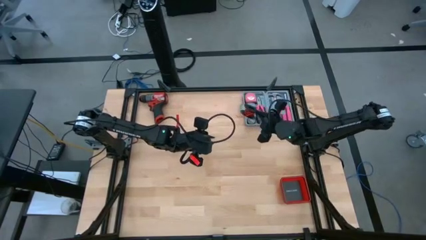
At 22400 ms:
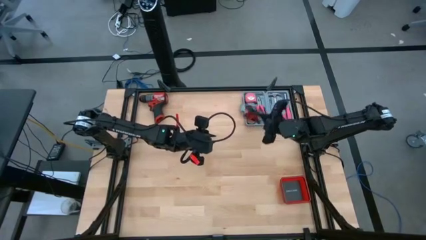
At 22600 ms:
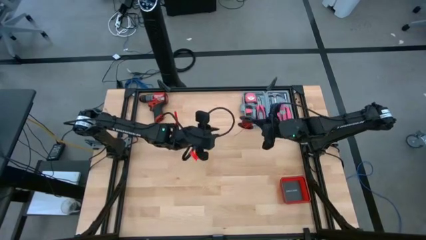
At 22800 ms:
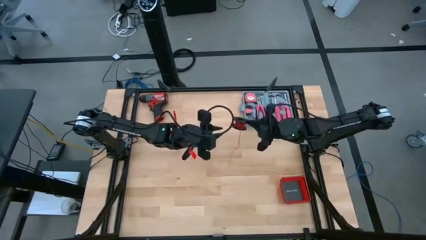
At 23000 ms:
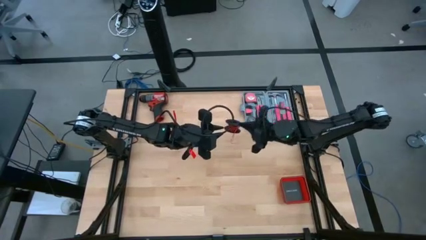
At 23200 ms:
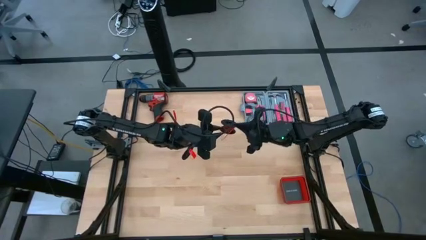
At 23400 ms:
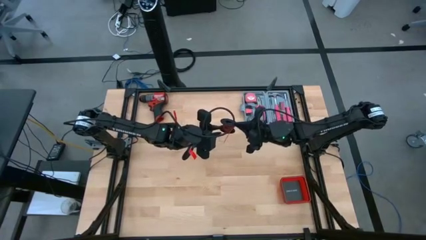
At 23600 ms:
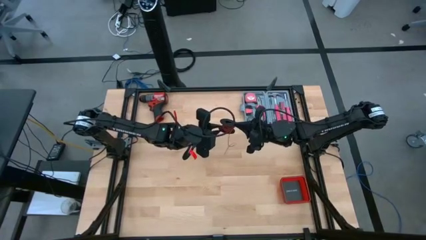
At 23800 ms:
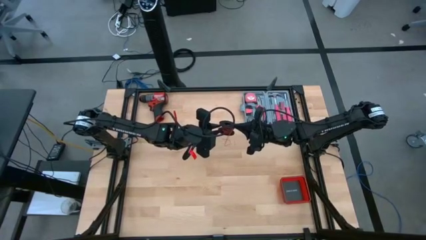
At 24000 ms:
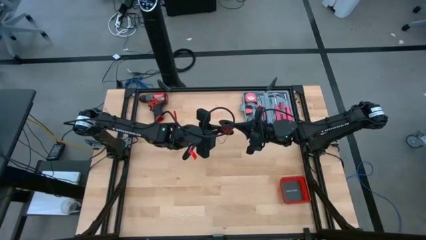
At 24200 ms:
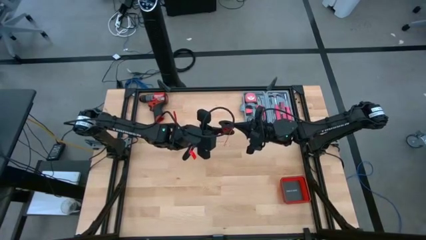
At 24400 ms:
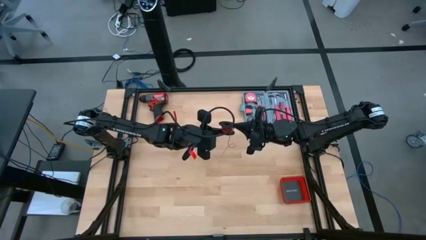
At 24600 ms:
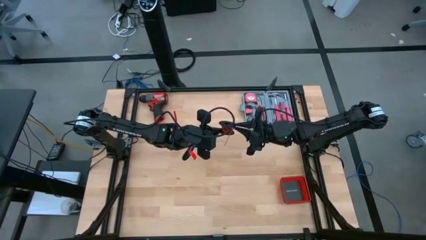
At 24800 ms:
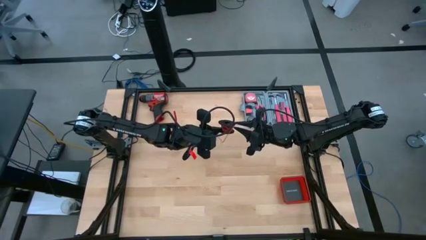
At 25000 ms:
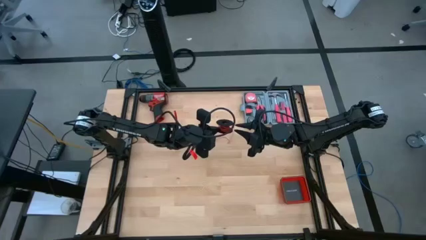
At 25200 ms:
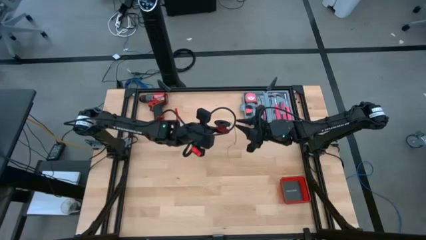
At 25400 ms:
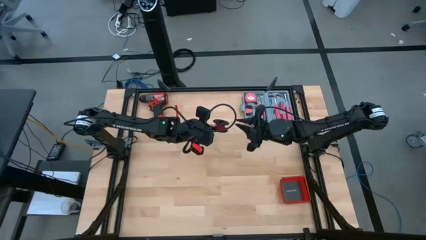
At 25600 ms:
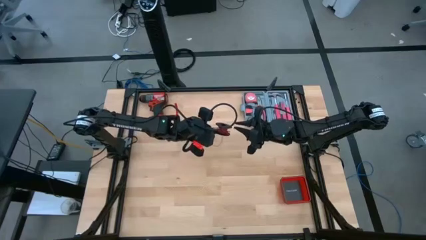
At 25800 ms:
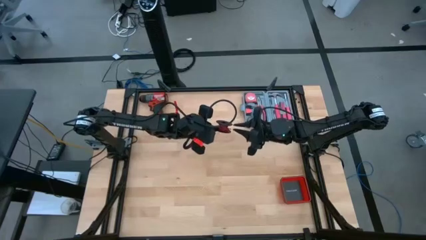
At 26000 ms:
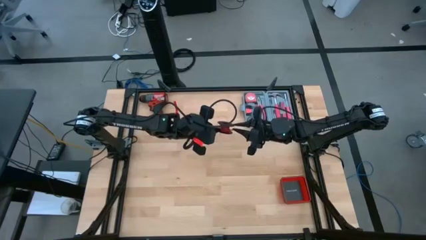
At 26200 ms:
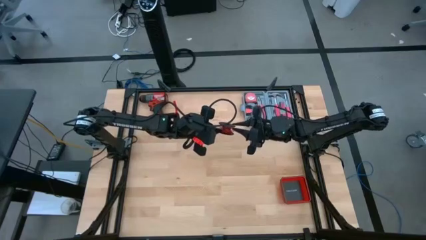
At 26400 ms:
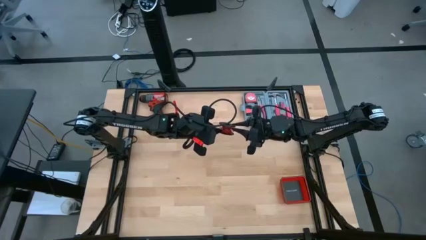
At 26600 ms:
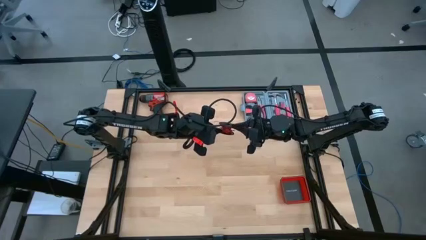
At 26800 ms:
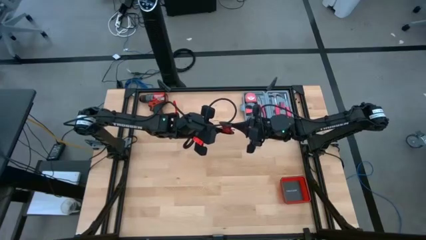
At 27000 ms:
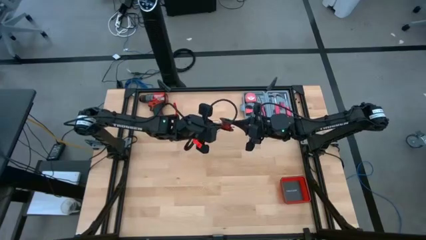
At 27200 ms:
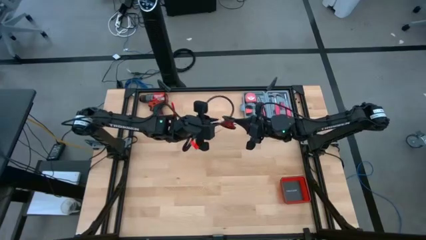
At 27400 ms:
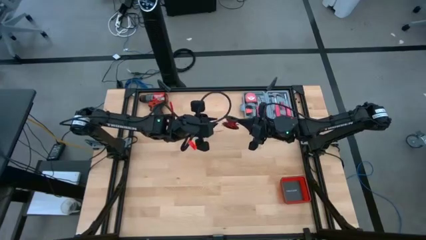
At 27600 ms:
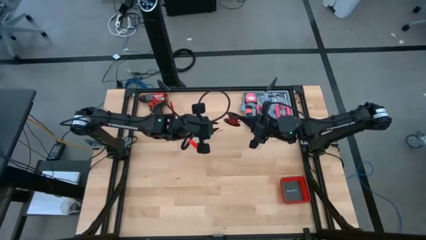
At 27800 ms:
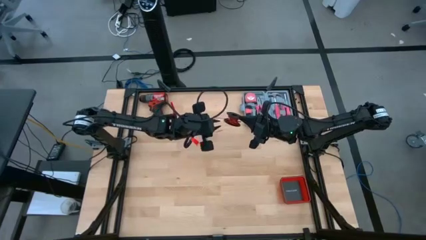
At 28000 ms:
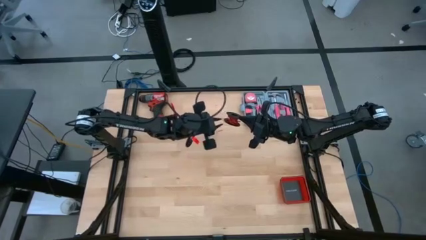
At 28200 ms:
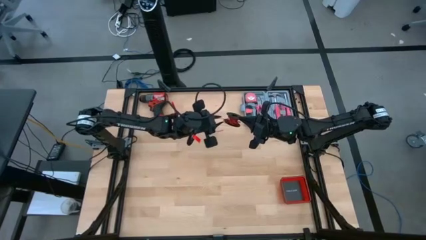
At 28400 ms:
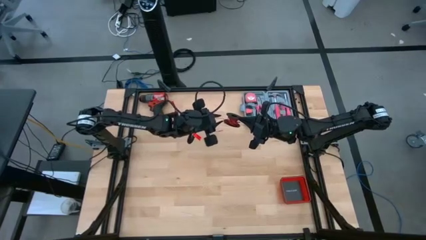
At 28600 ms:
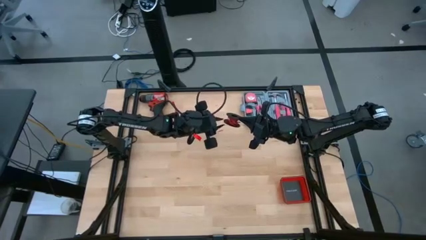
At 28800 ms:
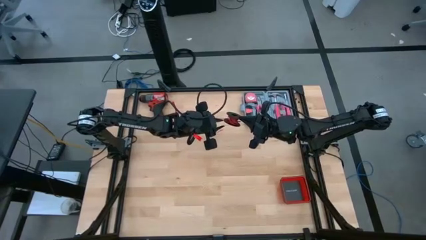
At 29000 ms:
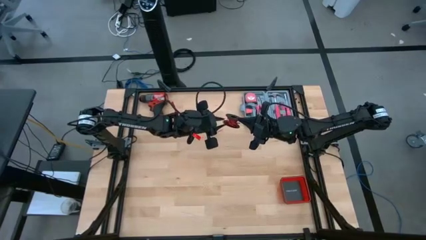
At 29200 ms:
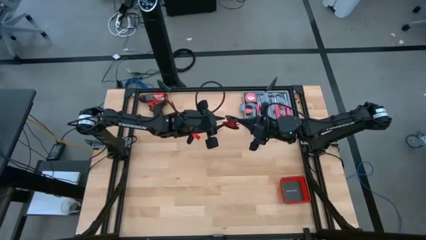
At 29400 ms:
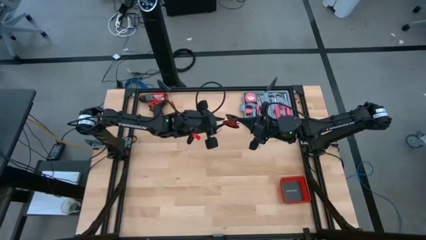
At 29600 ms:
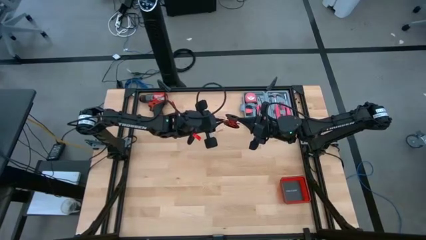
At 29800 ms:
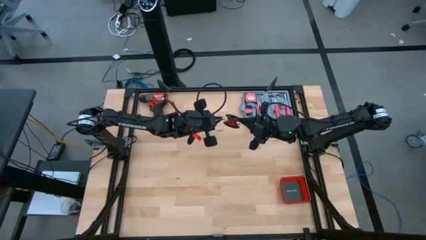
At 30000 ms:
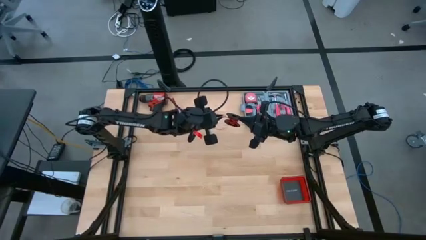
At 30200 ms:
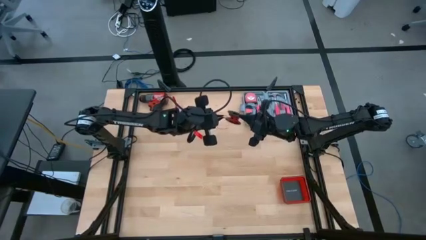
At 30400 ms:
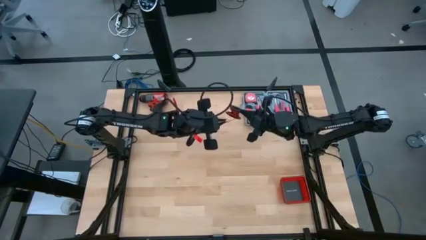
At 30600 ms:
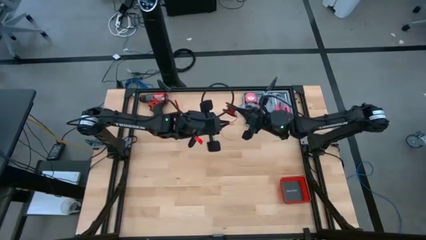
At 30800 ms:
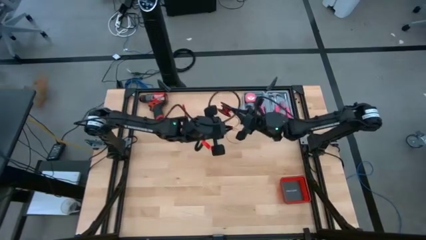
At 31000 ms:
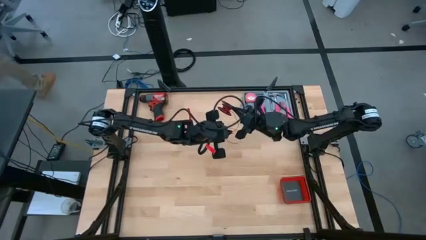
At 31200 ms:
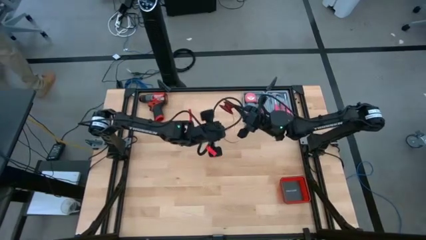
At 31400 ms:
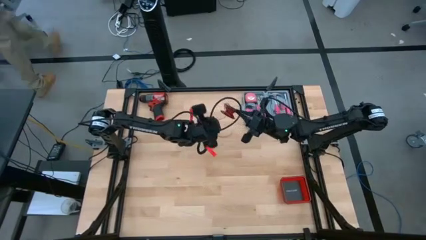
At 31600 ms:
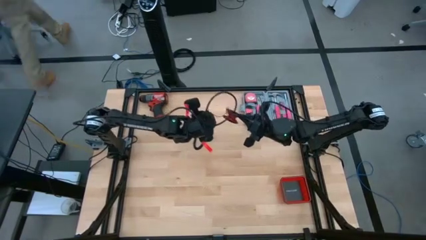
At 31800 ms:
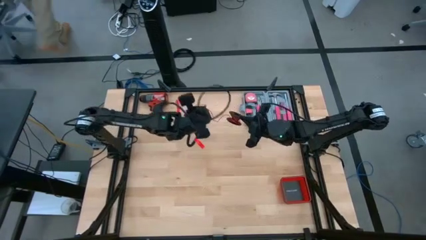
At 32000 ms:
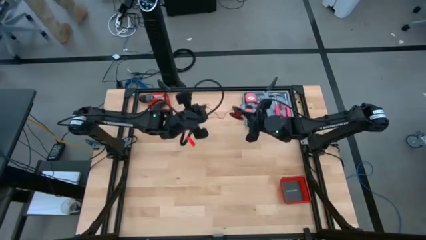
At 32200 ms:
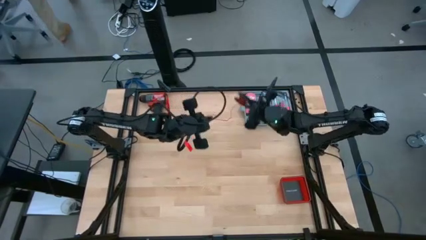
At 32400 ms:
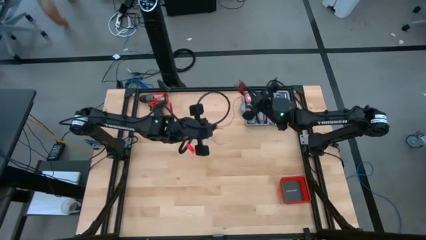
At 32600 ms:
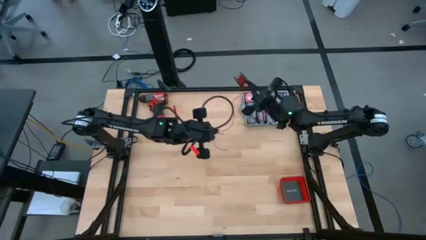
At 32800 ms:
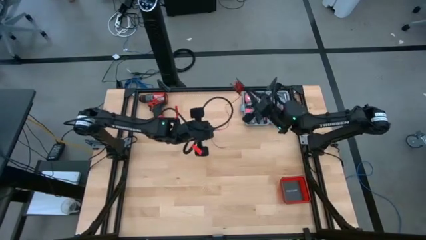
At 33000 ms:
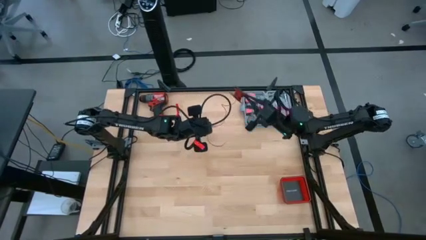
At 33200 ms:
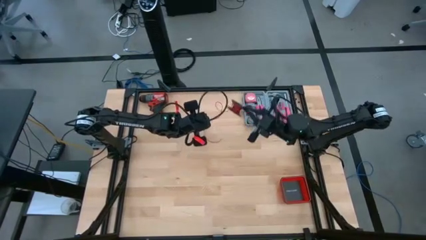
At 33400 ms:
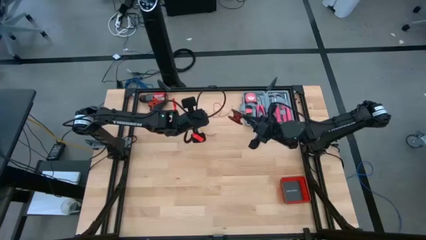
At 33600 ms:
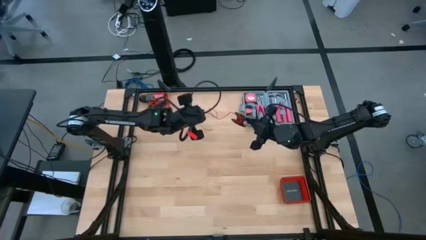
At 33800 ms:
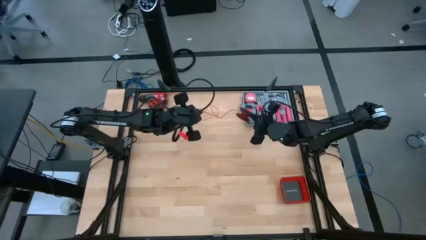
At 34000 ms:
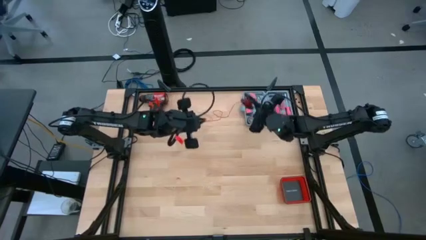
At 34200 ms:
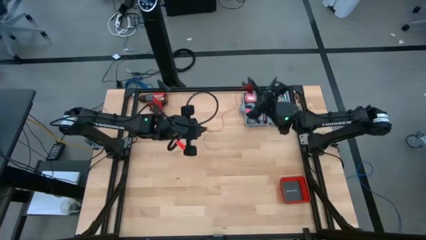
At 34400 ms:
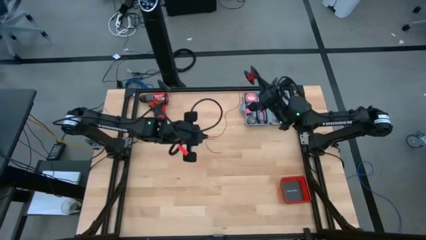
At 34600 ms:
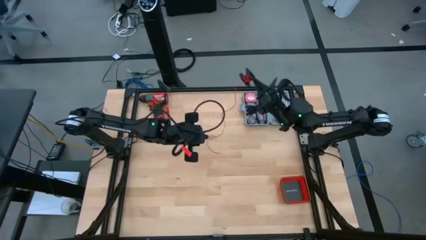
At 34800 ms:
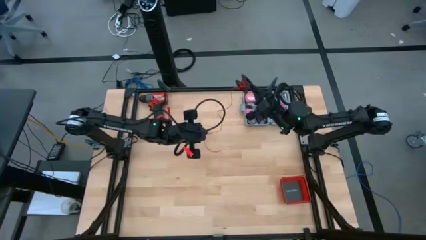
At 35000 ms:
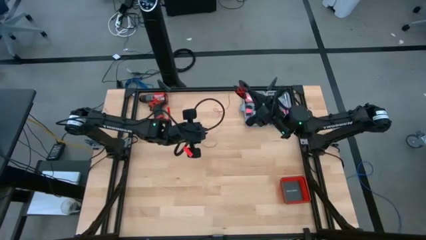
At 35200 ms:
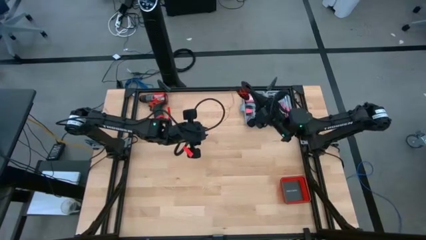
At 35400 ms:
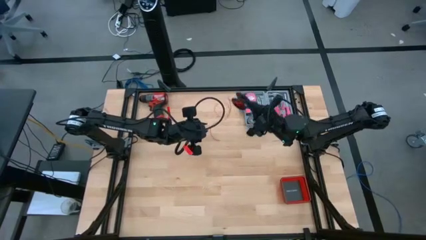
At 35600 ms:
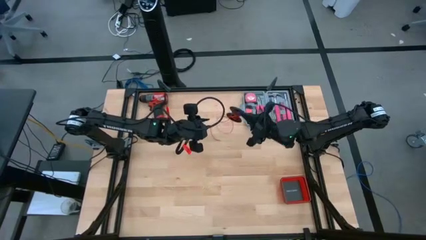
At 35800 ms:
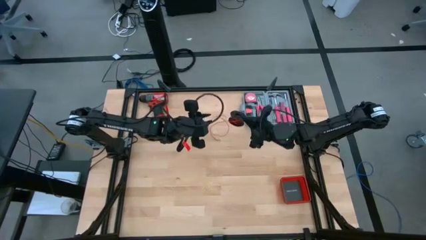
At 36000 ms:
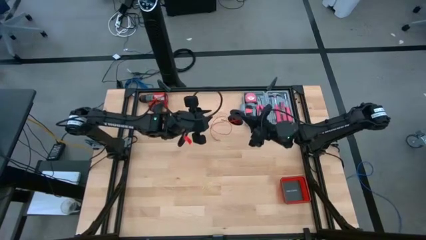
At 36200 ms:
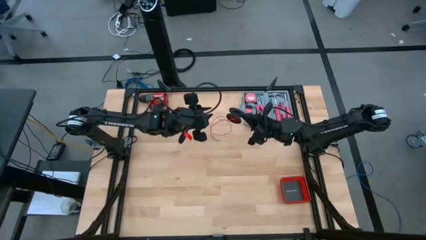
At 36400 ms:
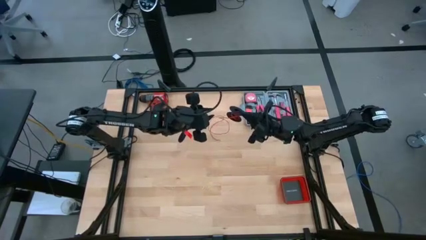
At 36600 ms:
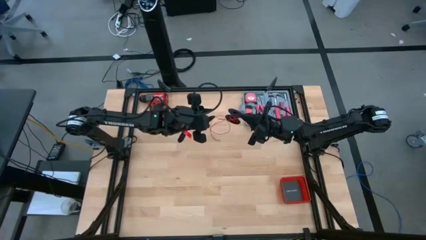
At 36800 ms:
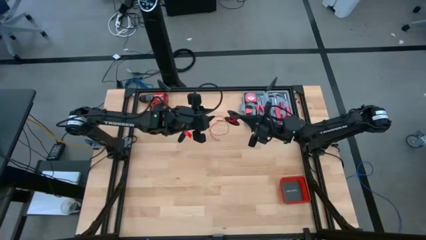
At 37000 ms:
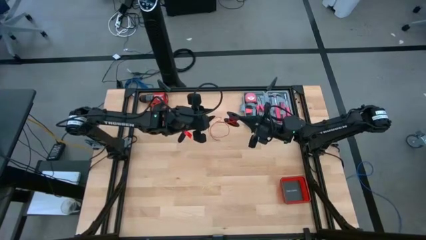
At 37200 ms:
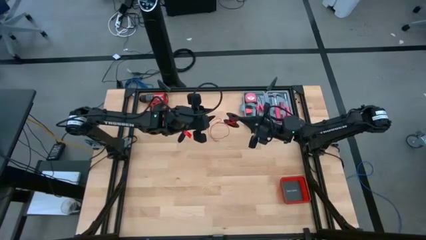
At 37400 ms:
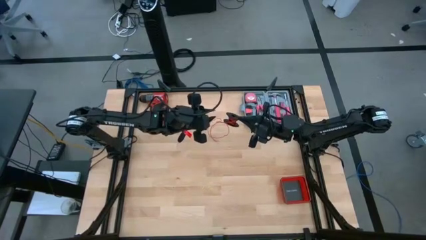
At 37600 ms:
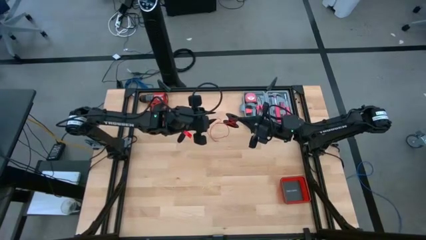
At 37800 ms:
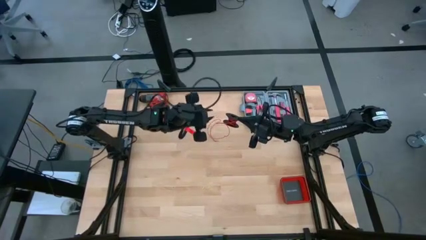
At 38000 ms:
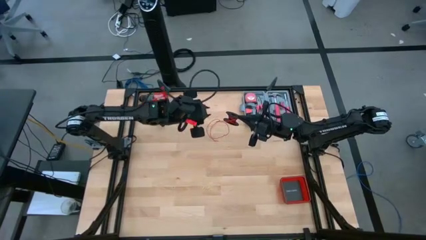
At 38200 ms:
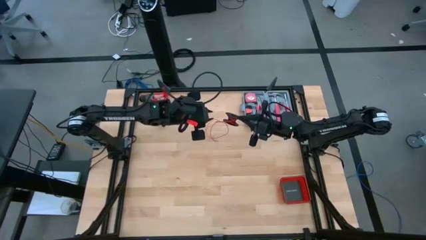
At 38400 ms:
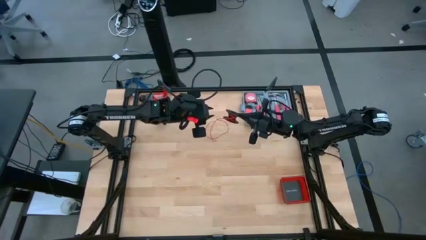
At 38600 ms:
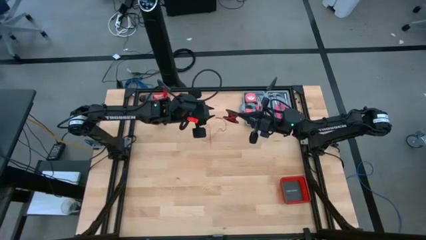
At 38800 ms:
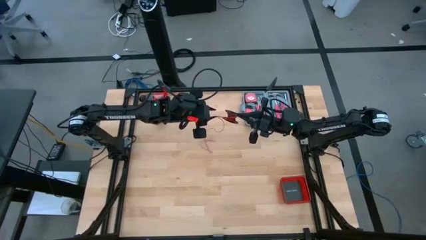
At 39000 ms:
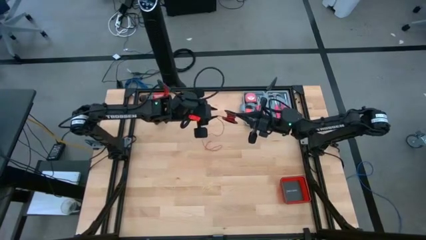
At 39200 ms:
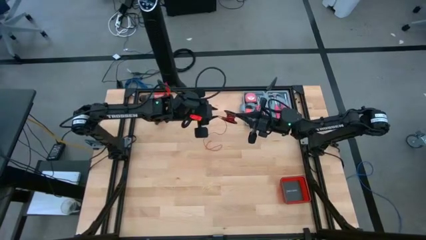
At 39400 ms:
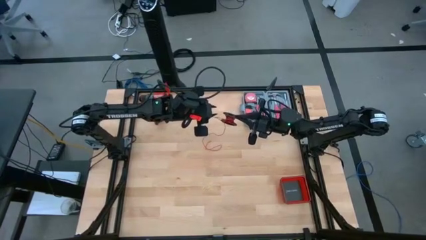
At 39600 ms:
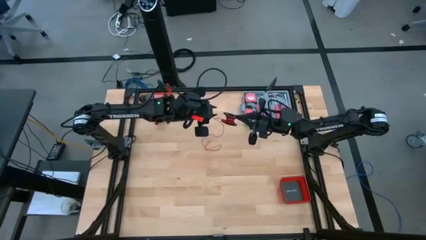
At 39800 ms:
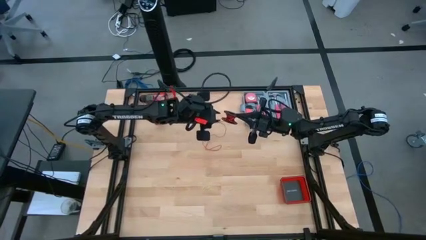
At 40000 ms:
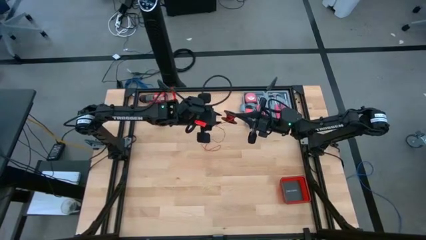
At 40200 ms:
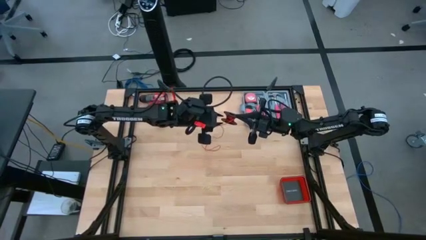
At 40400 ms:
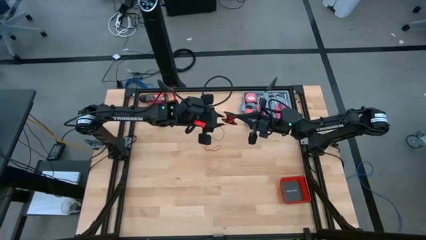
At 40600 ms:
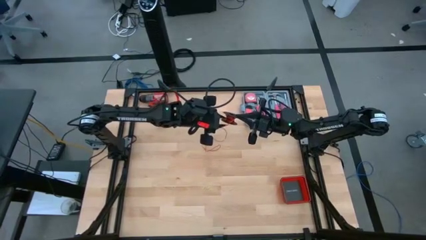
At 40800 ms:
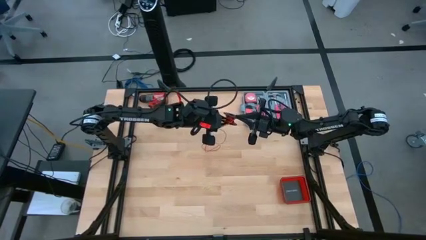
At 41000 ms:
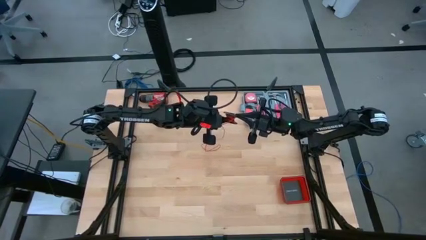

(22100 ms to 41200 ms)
Task: Coil cords
Uncoil the red wire from the black spool
